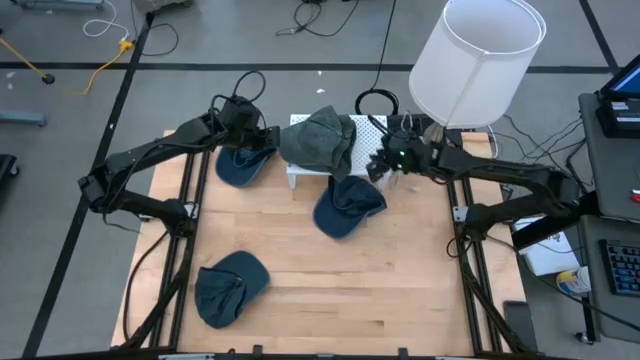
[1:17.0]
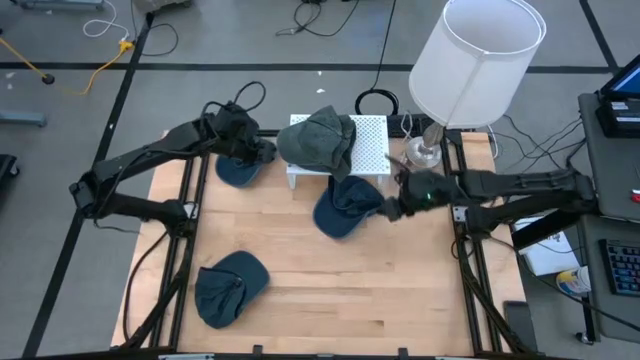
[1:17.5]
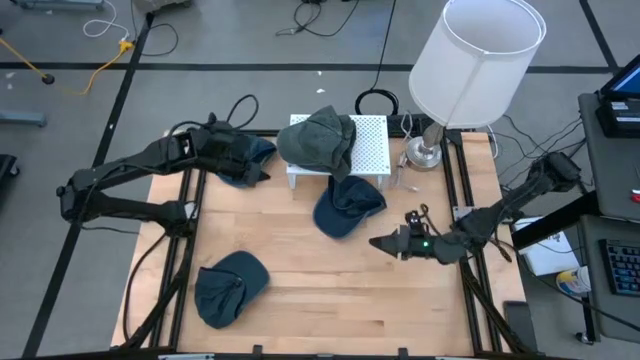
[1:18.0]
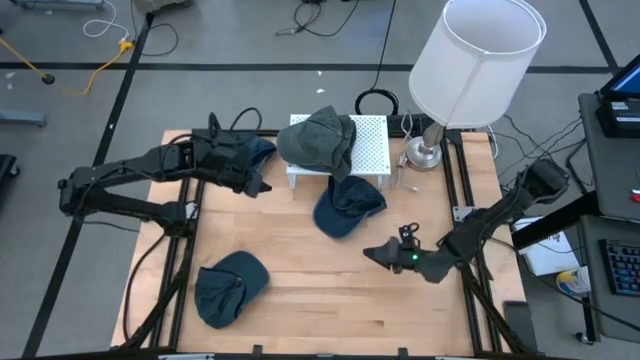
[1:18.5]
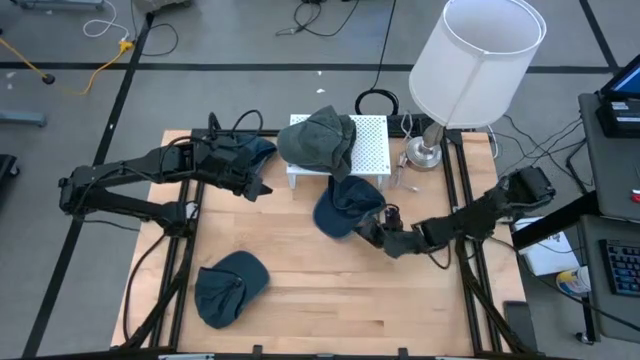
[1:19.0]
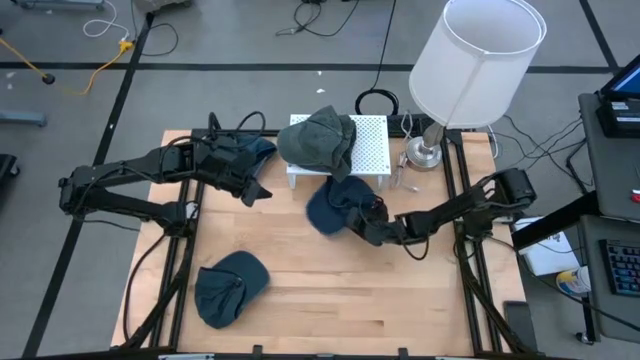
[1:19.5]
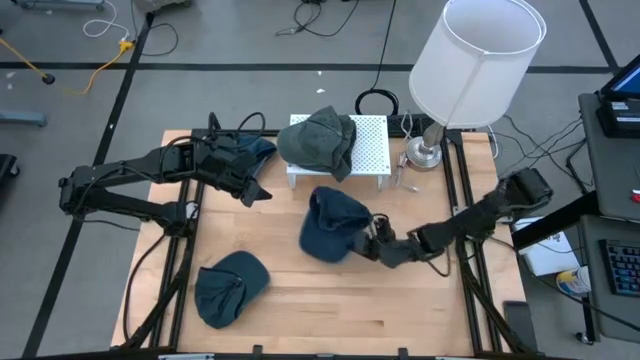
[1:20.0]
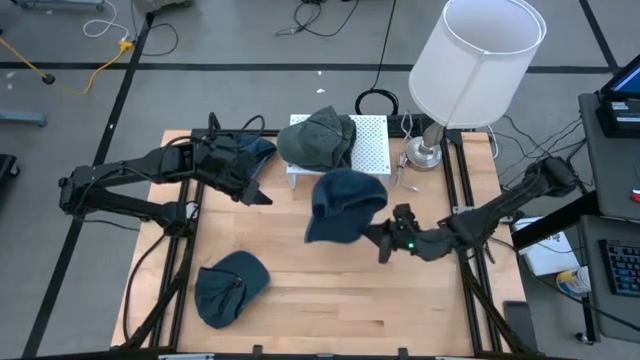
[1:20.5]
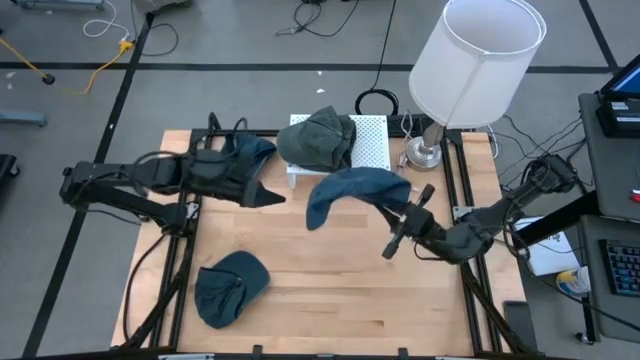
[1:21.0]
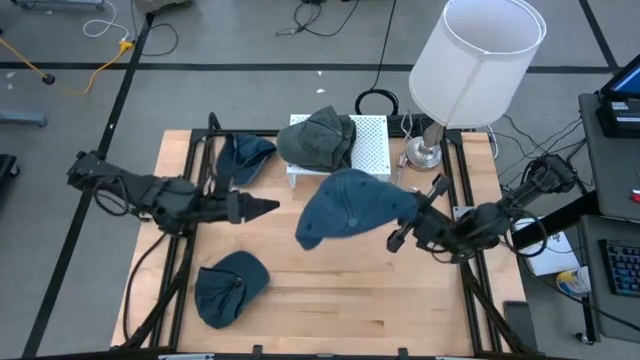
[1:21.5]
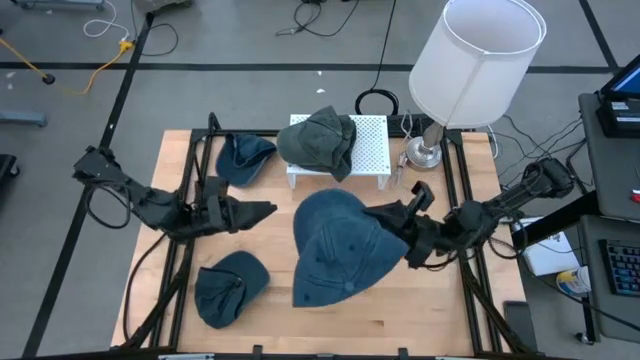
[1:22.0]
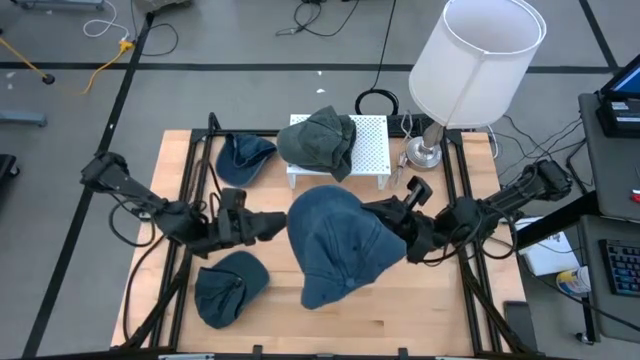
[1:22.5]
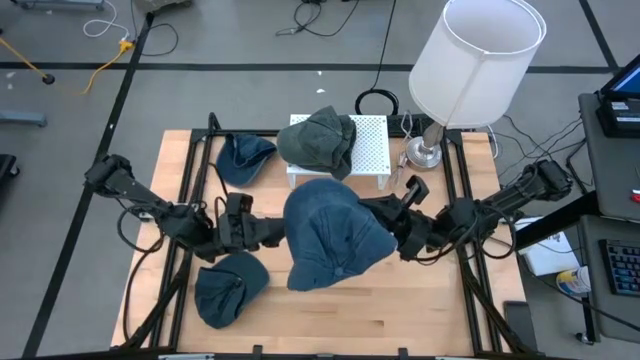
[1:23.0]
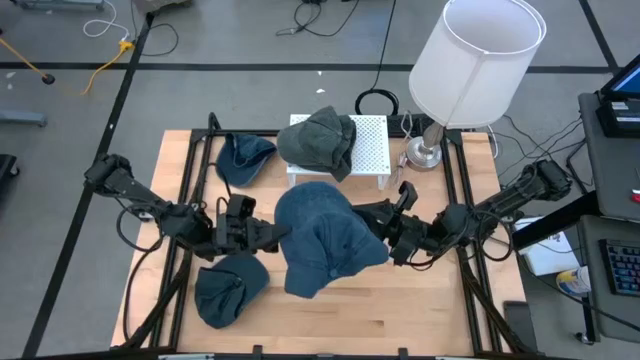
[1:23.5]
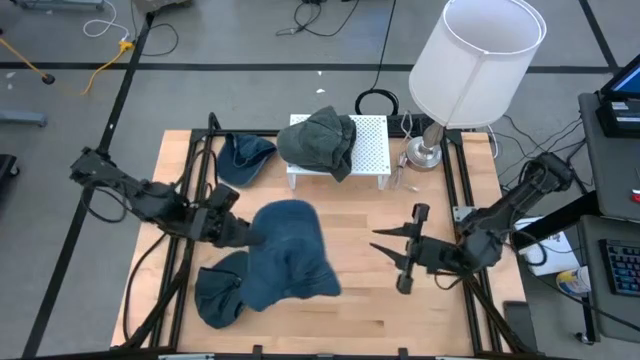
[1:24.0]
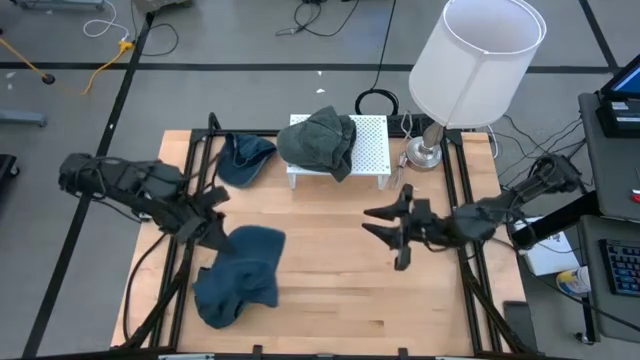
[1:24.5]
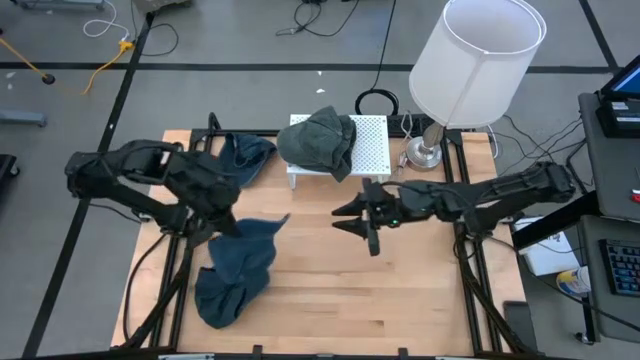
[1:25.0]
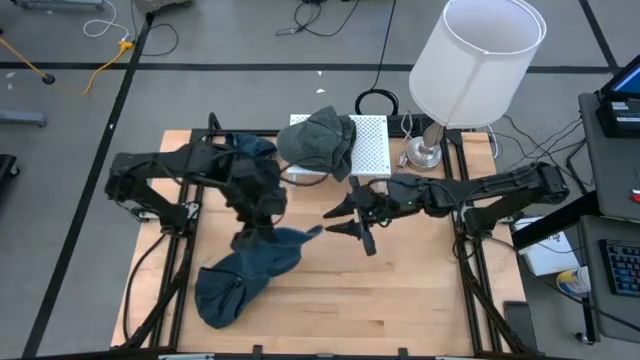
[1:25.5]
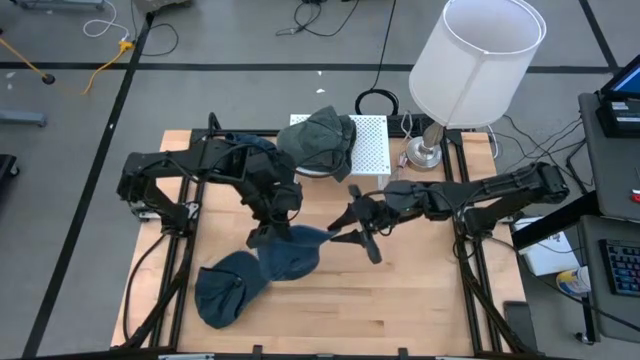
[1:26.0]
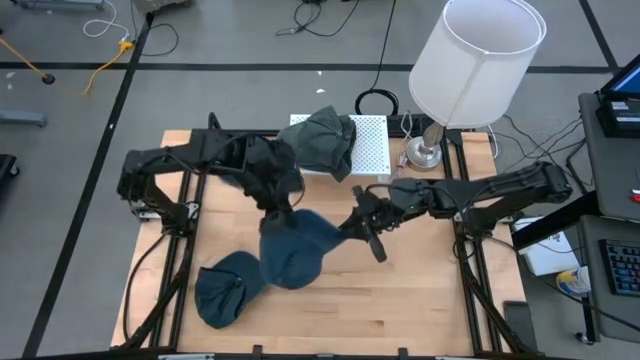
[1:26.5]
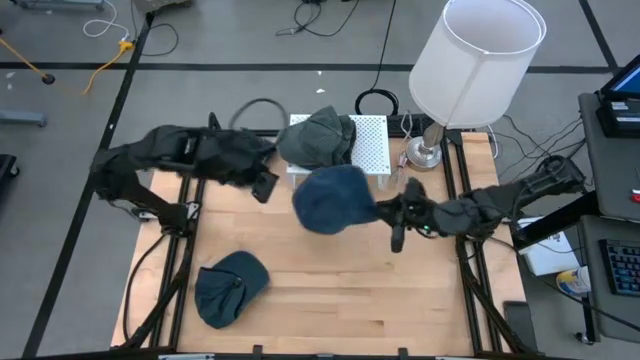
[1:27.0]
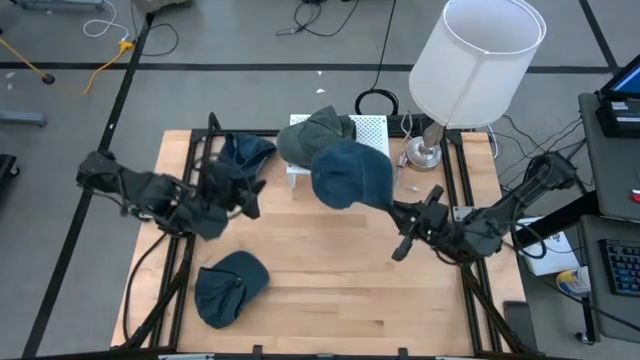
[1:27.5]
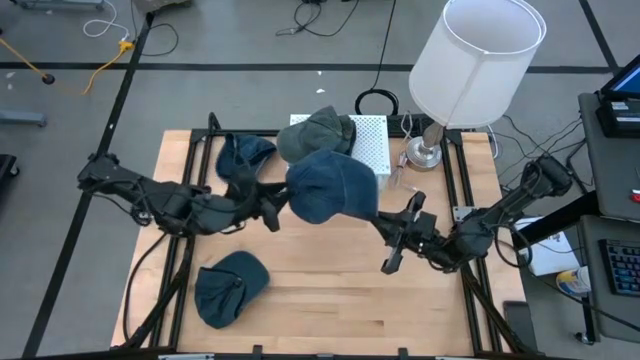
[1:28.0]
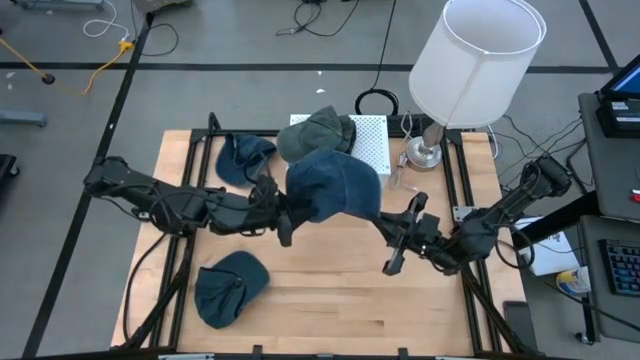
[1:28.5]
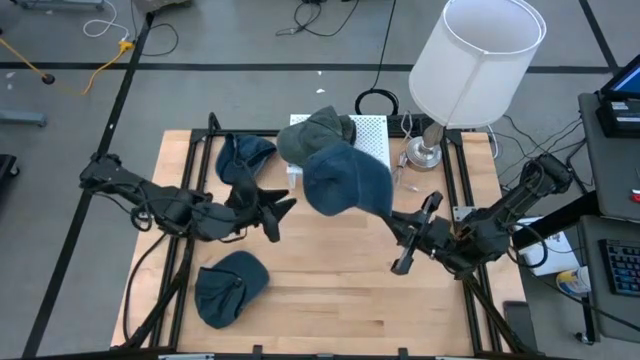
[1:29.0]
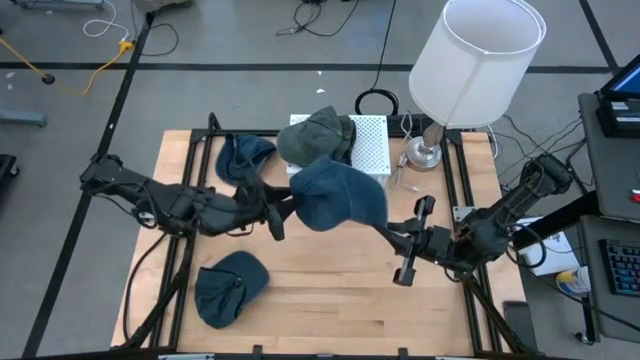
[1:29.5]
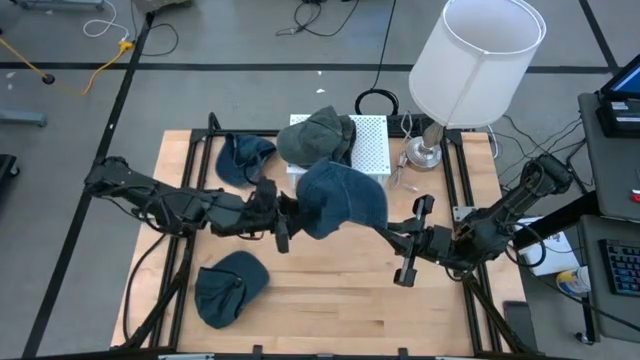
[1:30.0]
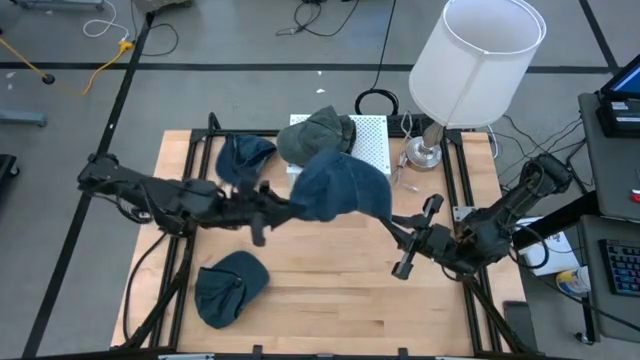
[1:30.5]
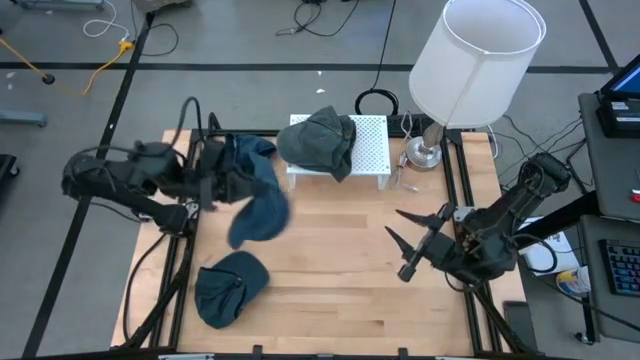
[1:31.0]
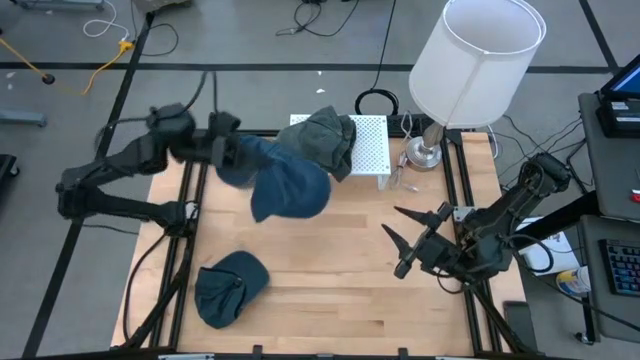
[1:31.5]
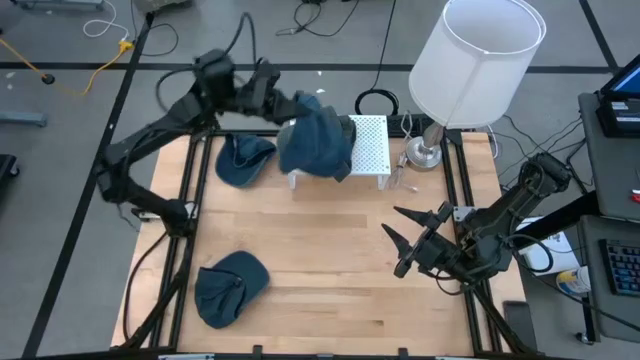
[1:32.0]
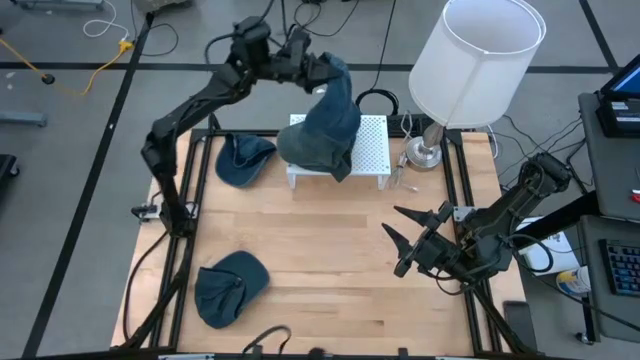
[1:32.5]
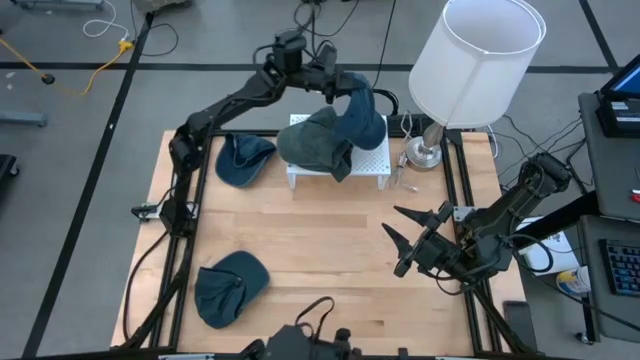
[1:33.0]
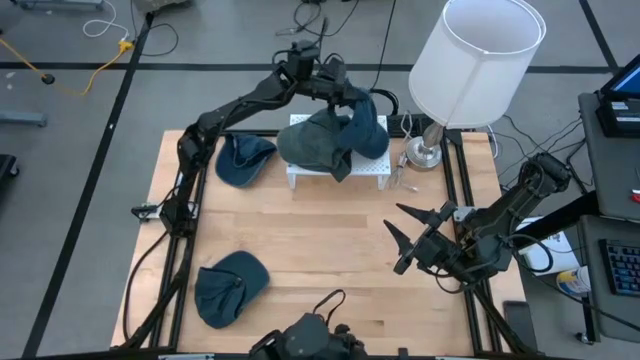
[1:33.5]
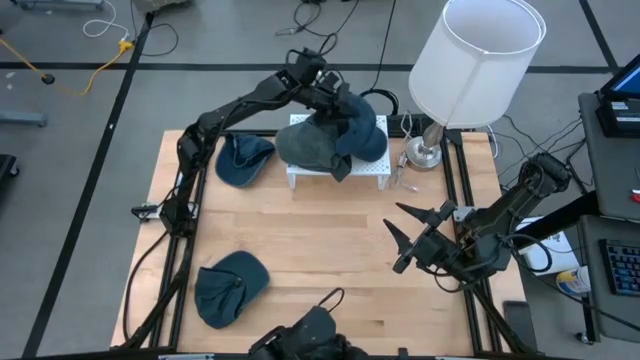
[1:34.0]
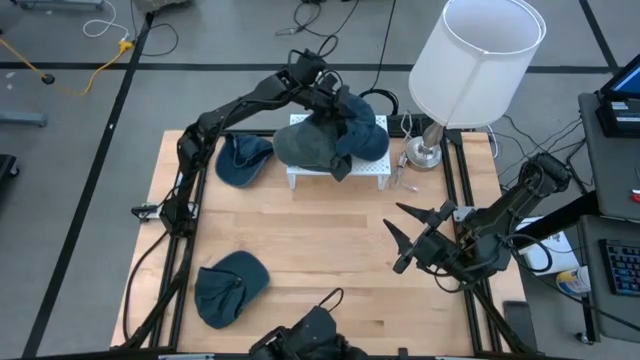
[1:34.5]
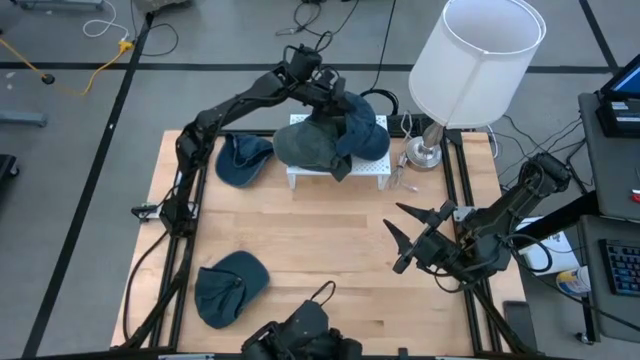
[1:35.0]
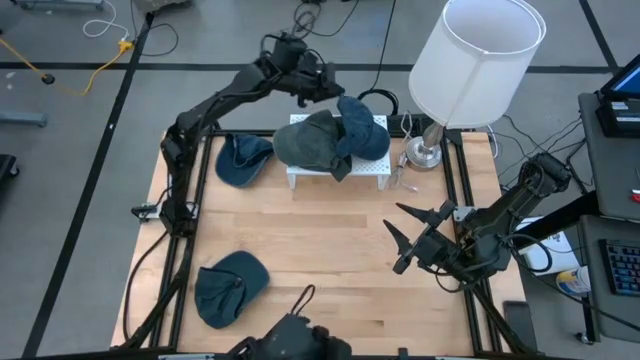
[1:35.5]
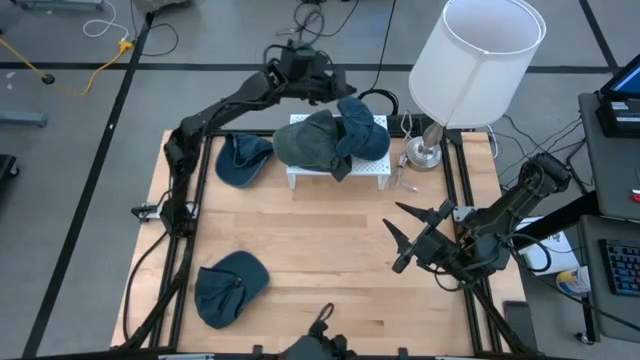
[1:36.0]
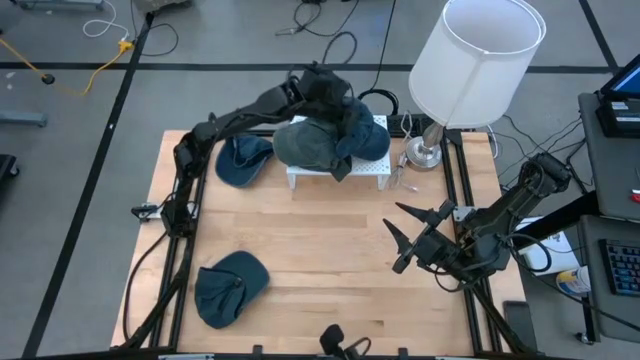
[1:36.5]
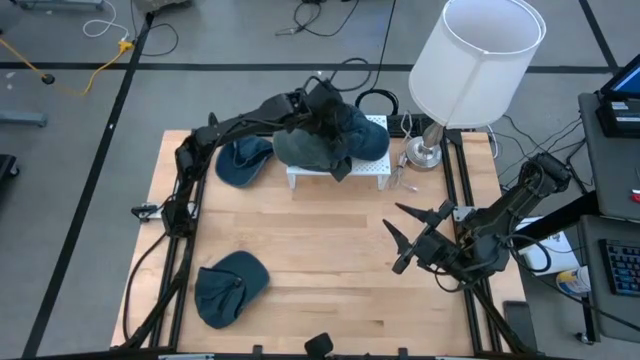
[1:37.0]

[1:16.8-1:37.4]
Task: Pick & Place hat
Put the middle blue cap on the shelf

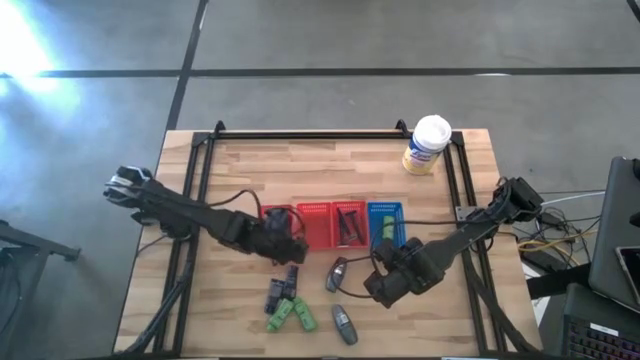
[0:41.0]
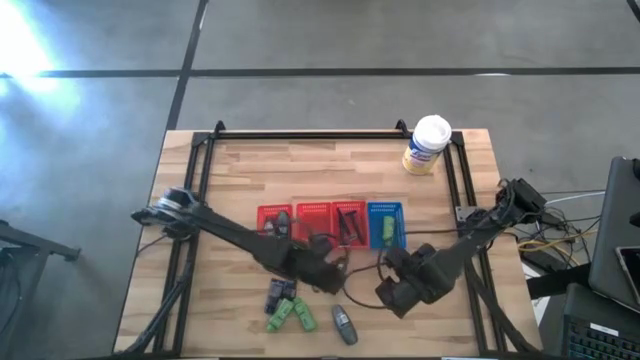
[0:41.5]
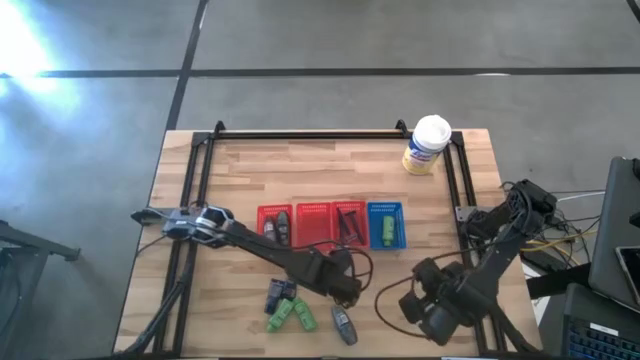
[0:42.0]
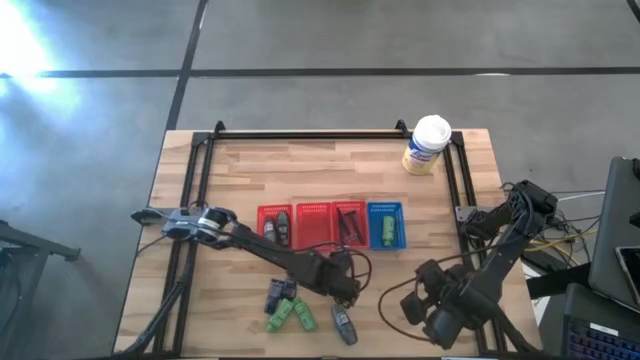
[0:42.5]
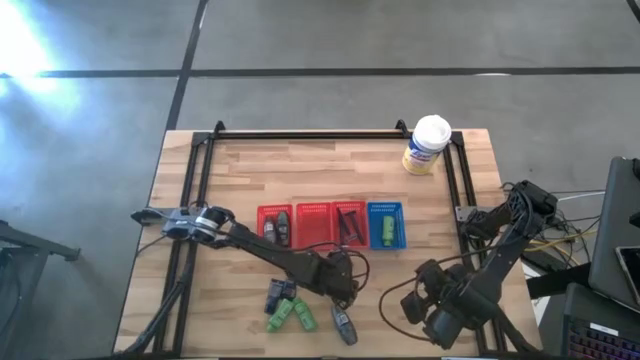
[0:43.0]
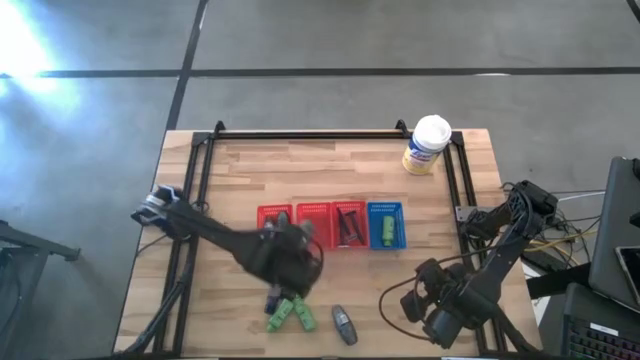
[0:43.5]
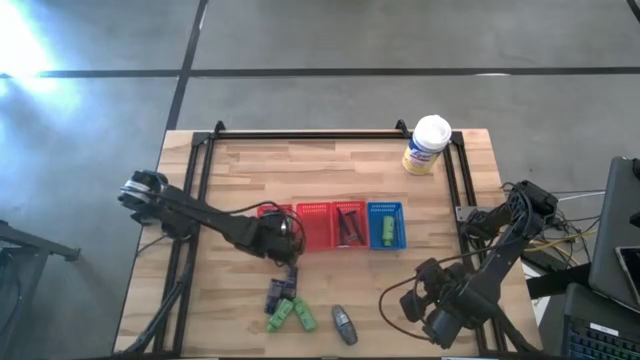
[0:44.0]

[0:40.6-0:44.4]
Task: Pick & Place Travel size toiletries
Put the gray deodorant into the left red bin
